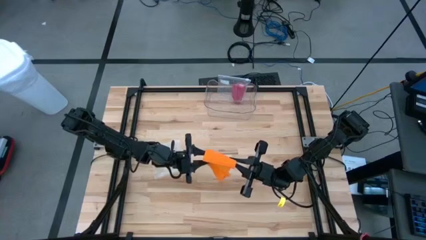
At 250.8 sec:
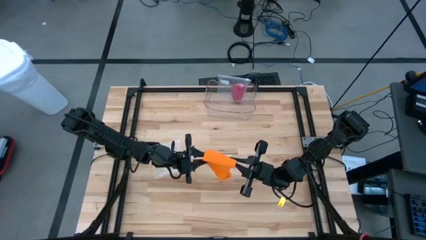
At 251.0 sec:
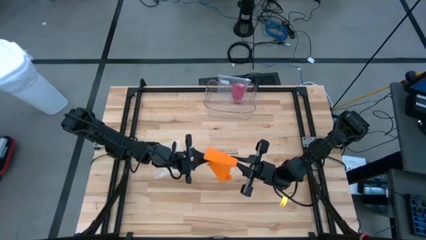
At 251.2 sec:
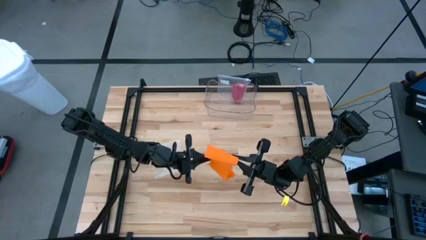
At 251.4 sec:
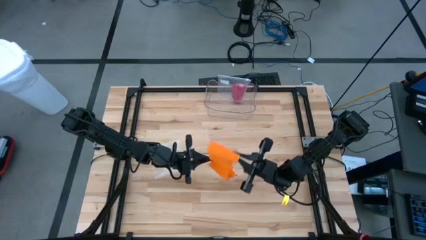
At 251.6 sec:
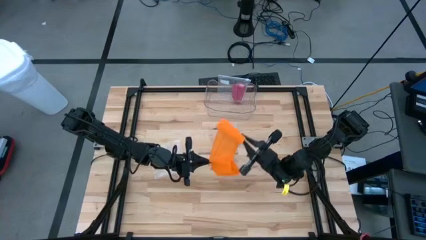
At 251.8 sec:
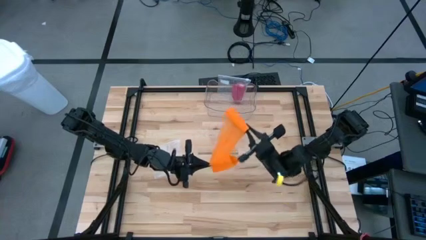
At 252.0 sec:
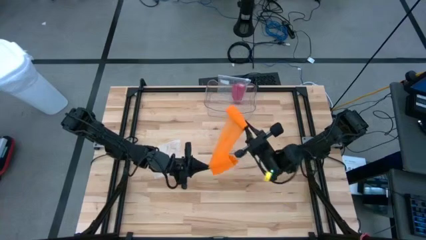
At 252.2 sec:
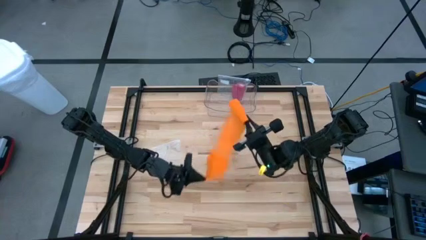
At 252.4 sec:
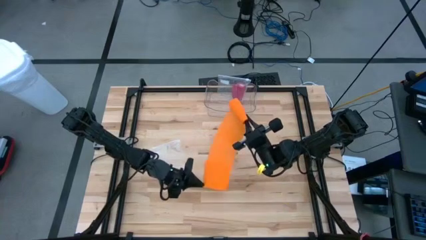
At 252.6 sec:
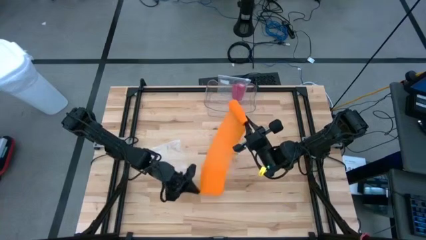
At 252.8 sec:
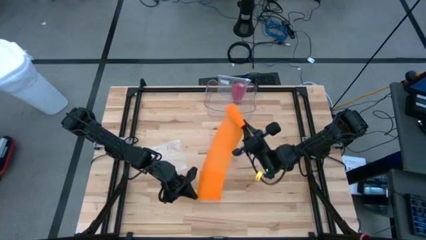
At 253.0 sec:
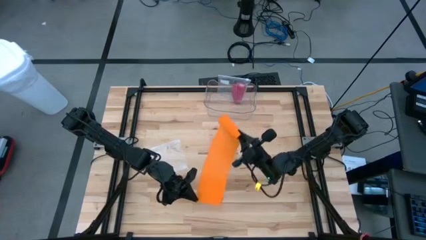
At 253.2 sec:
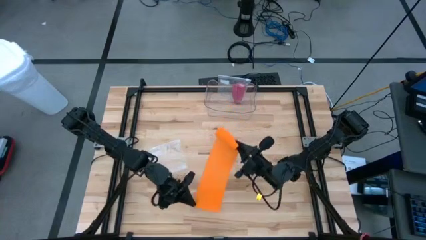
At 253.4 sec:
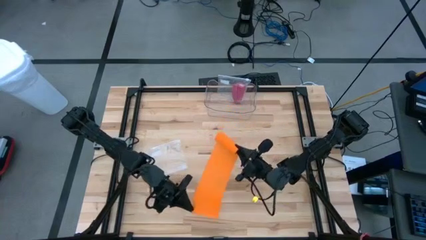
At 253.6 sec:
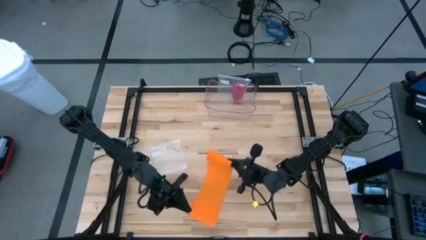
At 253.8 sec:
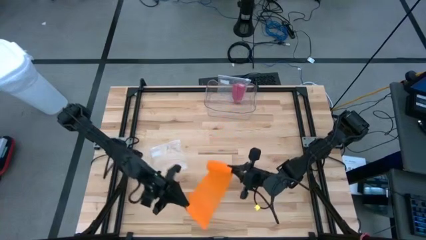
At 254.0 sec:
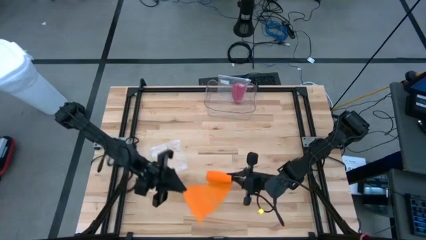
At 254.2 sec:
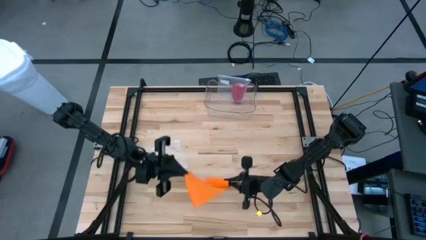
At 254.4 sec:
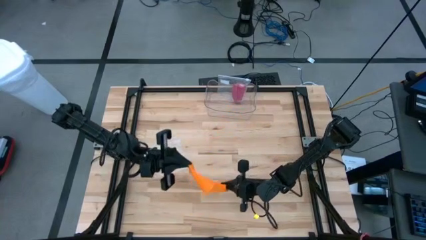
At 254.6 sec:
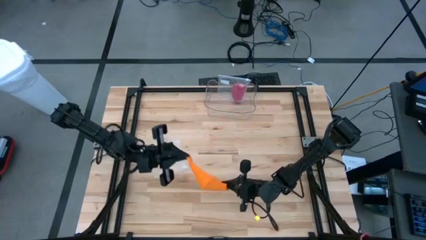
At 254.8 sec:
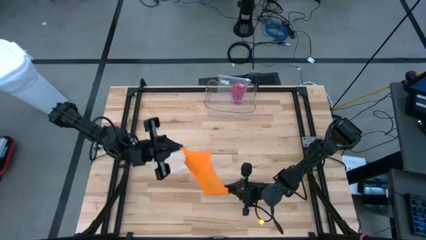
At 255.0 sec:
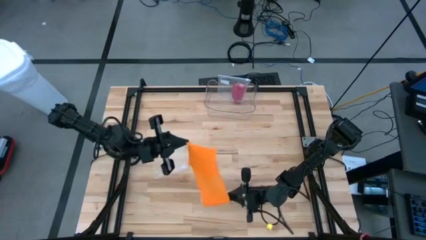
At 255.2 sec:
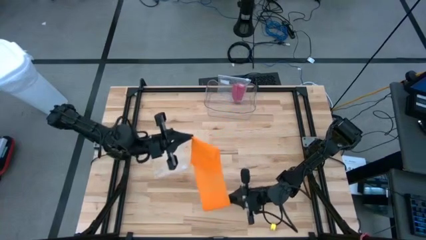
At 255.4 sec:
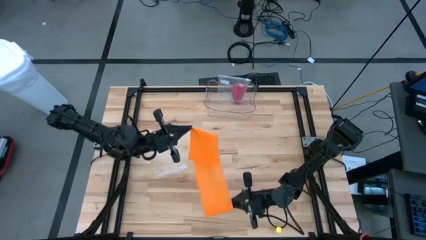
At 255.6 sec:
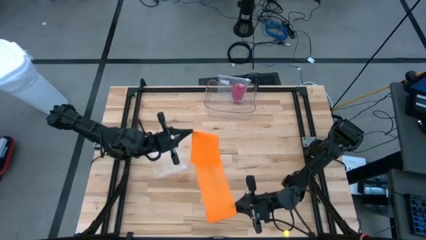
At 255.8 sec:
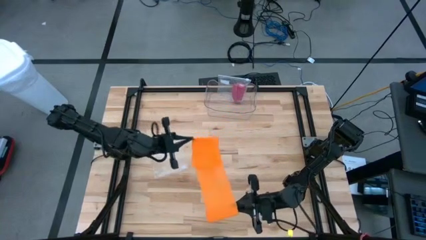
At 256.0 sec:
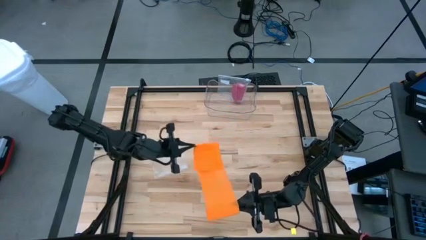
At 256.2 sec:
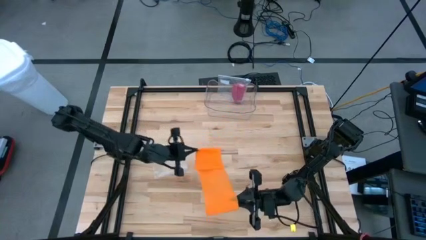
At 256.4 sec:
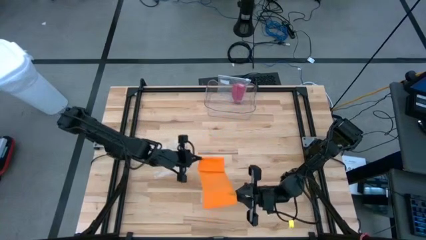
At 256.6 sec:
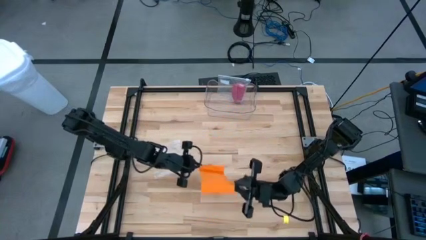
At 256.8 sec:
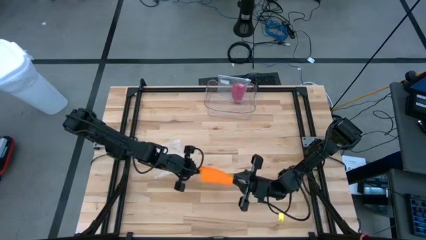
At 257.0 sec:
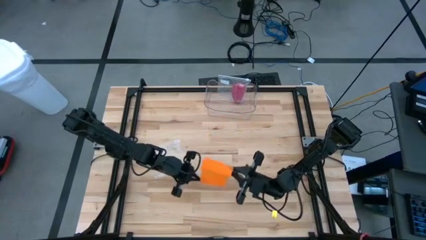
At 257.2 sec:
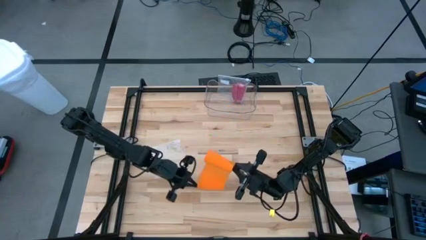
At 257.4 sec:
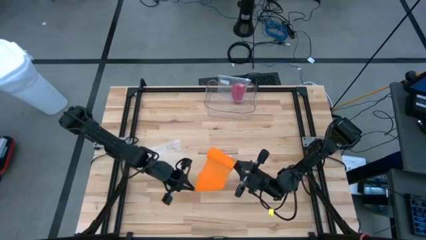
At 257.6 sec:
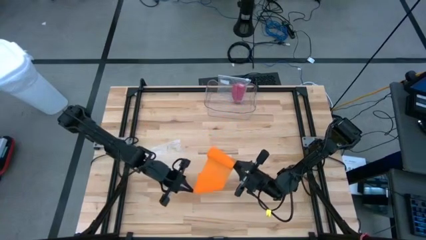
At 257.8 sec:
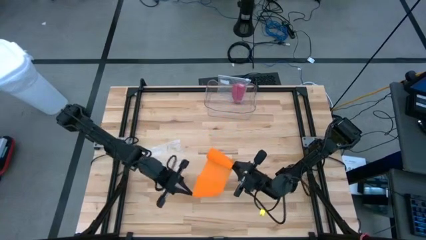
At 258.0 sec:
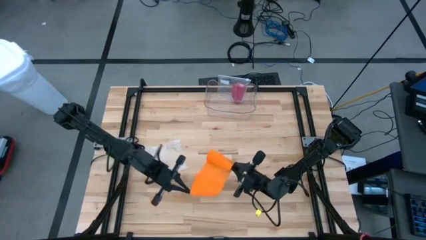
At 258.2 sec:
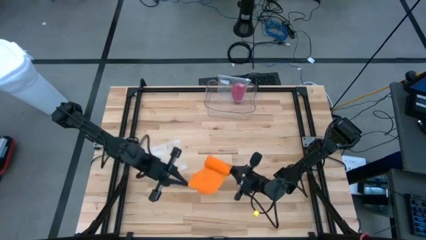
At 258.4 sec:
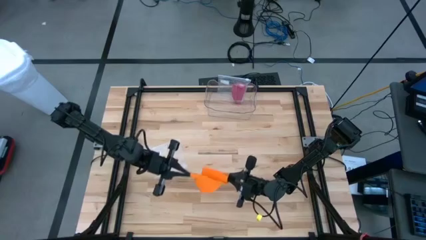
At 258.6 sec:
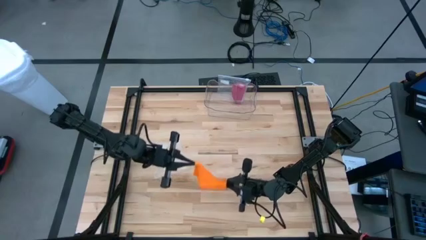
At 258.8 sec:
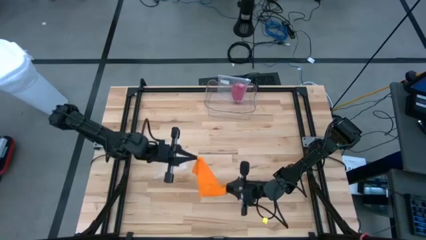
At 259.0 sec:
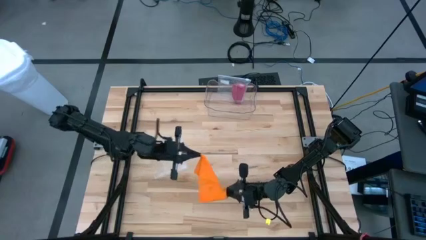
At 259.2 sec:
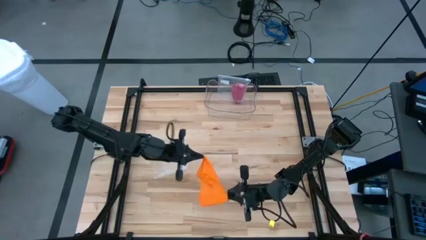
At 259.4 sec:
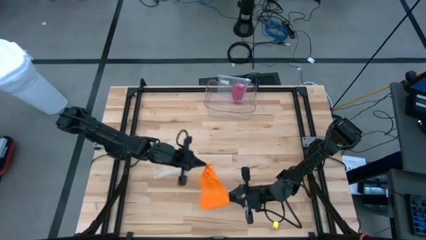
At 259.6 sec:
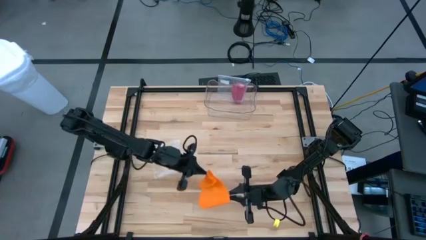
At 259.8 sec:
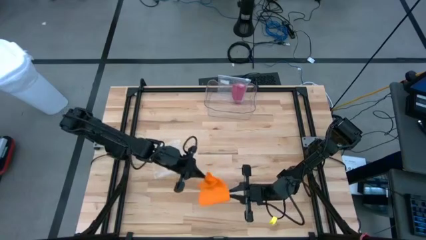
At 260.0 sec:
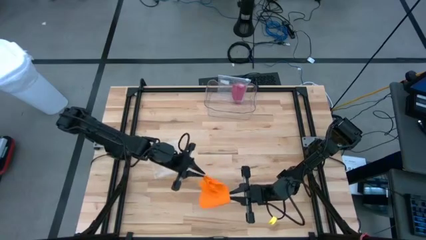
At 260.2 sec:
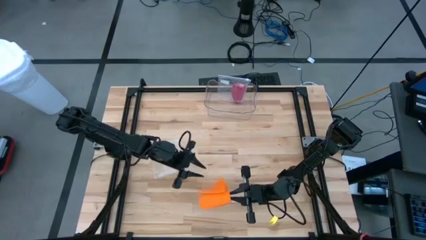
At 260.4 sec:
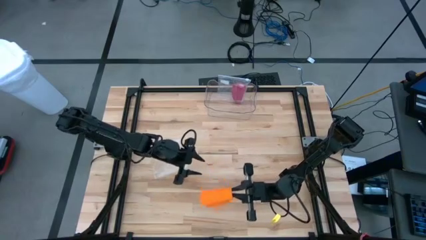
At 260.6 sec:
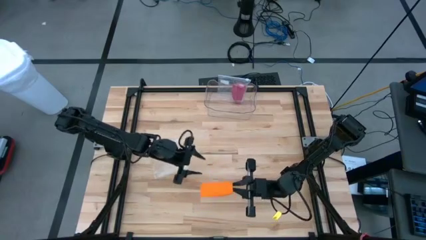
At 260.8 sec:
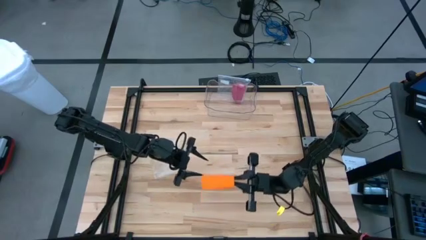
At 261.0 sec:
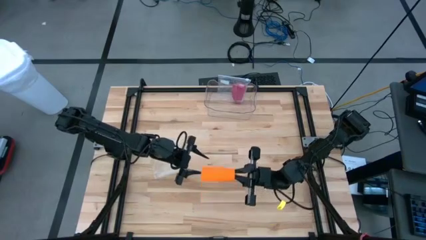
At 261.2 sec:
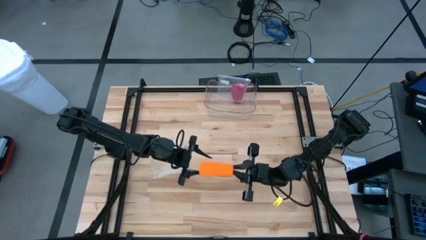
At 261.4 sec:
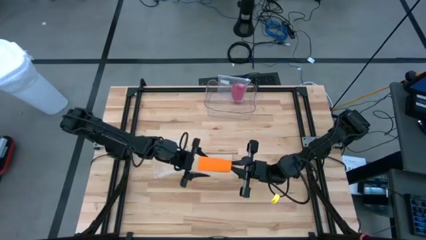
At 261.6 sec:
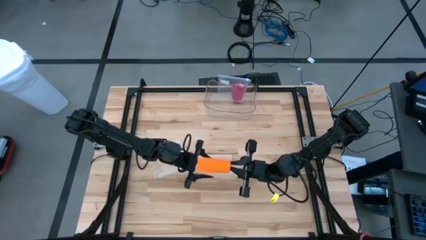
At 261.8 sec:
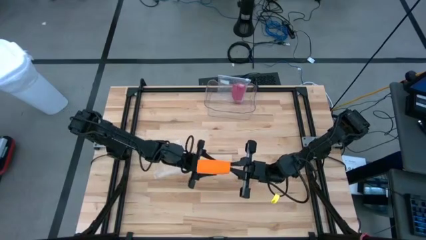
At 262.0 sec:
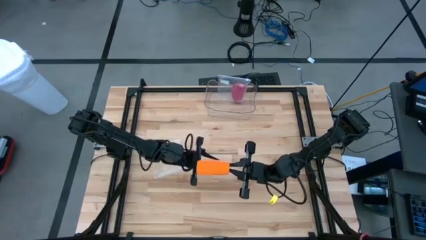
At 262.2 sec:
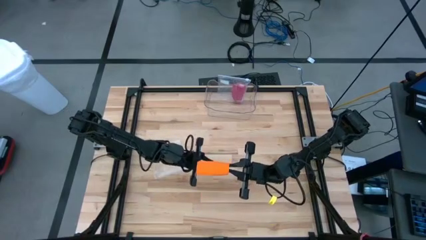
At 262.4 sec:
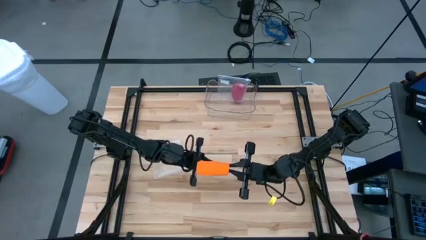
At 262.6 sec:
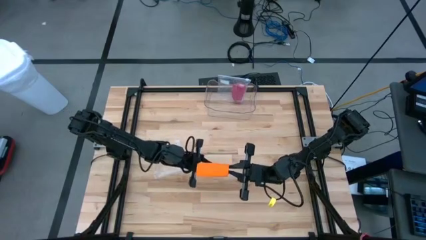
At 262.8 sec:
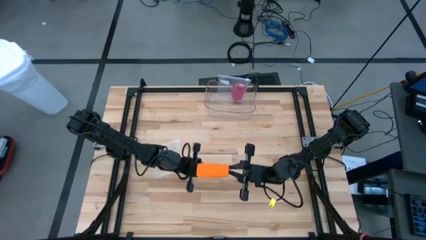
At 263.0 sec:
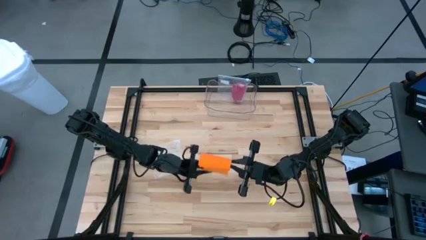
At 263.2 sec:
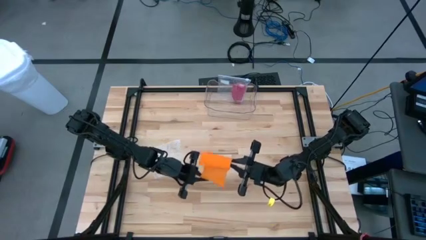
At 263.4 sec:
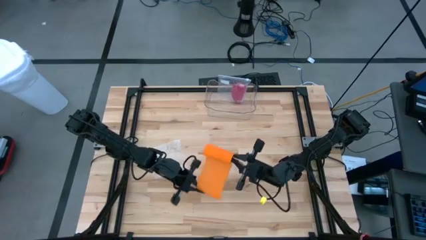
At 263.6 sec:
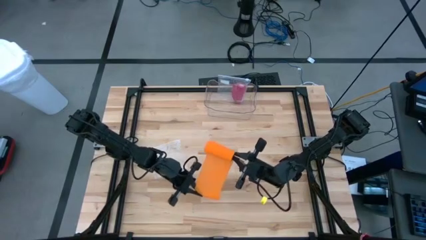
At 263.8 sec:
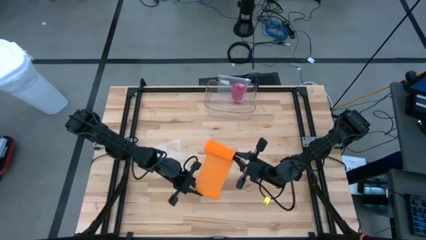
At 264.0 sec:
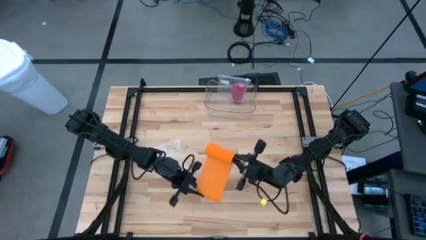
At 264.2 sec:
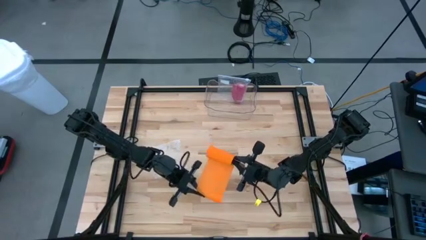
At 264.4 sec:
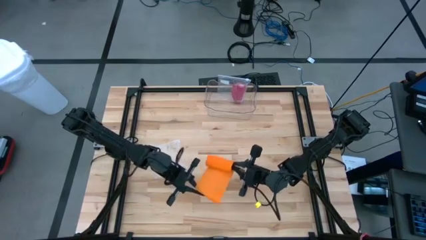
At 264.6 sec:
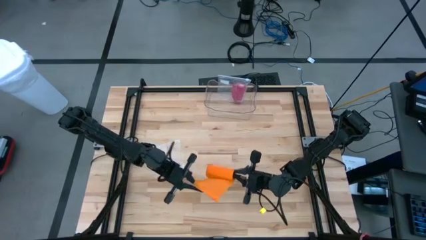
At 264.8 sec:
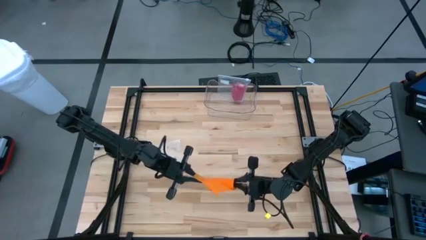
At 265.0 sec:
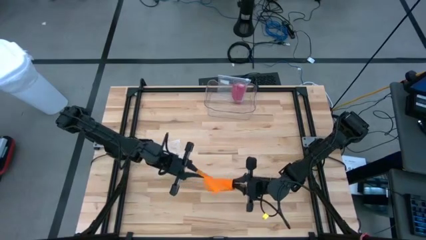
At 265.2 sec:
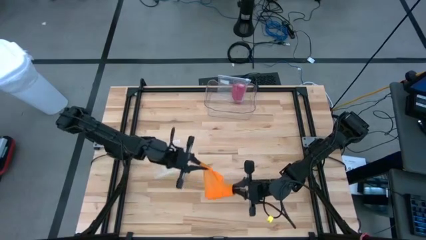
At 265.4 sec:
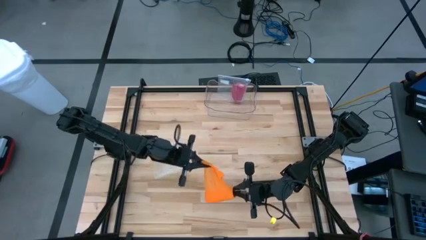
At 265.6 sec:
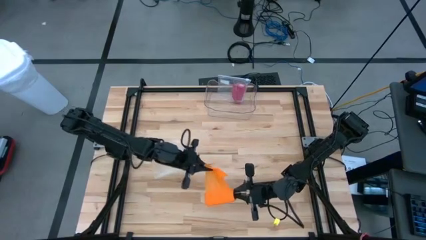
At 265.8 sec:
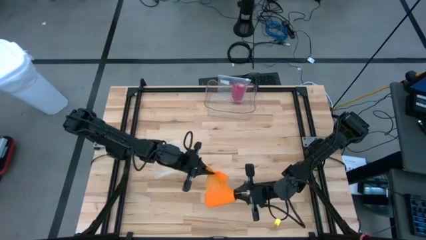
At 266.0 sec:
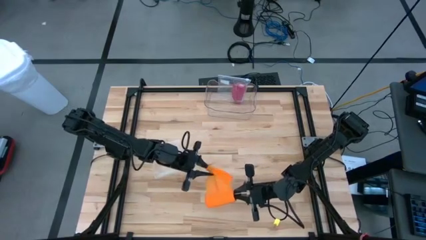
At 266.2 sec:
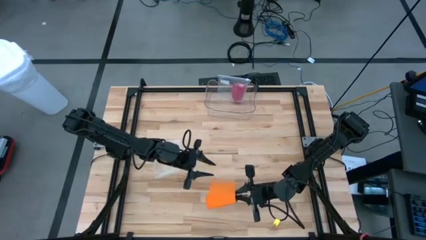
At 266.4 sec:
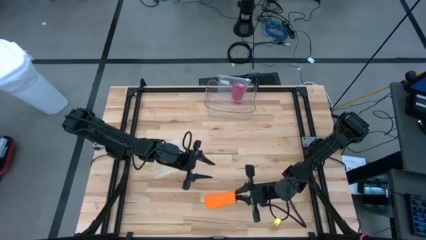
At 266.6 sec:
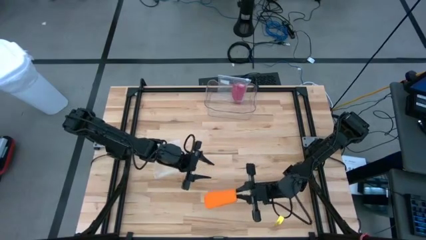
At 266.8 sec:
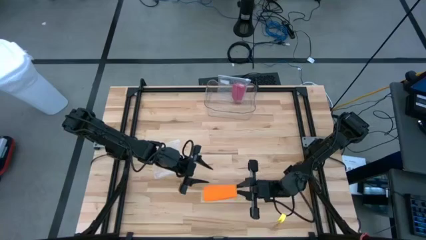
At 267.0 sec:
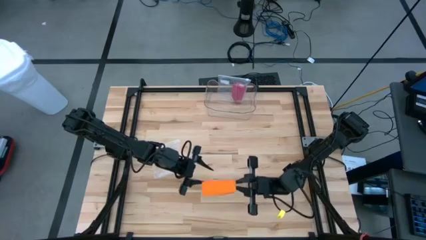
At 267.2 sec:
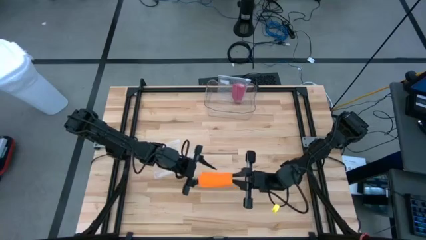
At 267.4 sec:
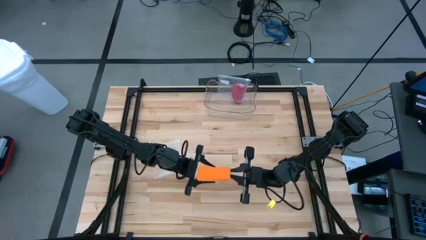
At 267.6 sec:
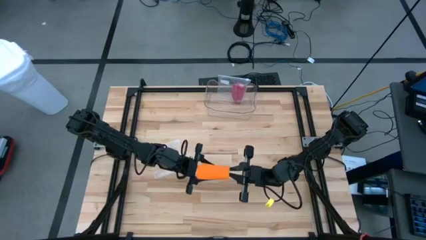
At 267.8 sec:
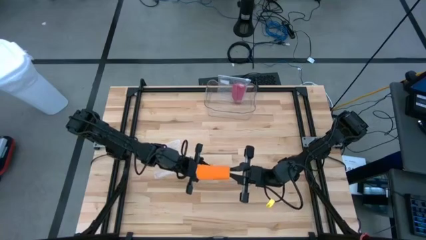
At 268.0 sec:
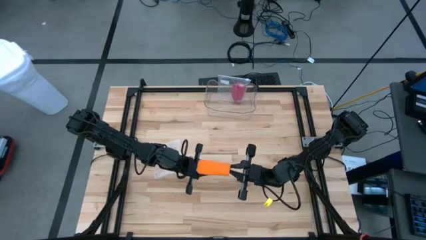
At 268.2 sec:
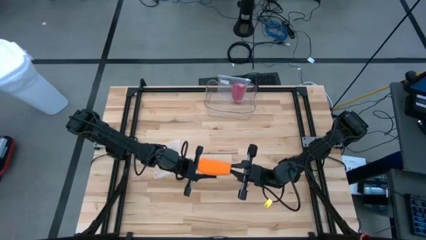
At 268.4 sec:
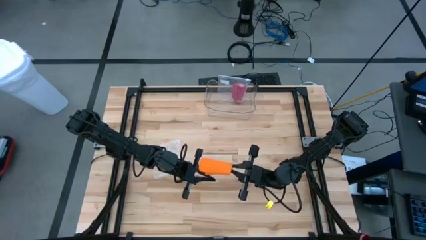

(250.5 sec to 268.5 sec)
Task: Roll bandage
Roll the orange bandage
